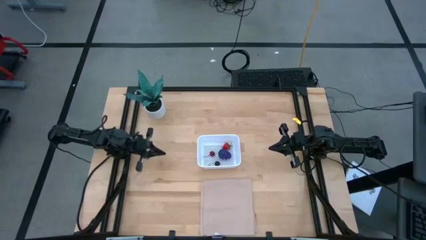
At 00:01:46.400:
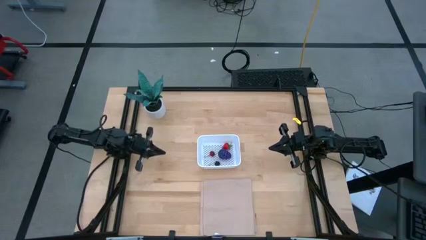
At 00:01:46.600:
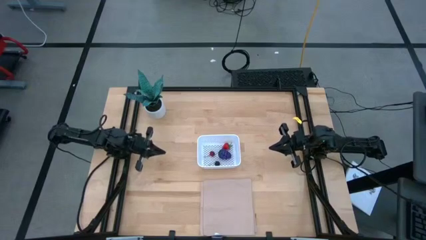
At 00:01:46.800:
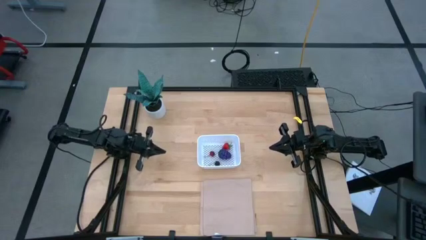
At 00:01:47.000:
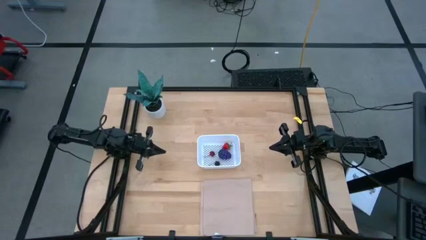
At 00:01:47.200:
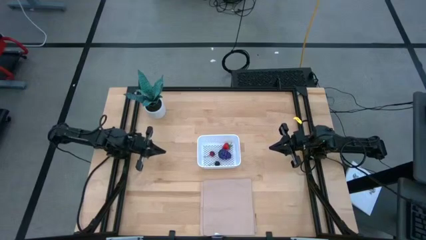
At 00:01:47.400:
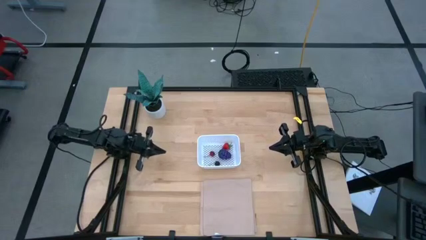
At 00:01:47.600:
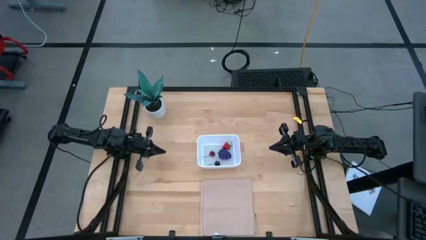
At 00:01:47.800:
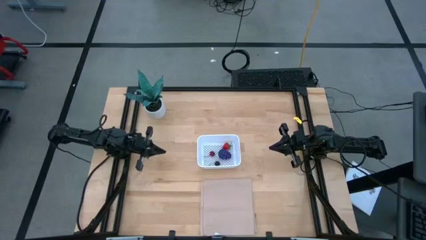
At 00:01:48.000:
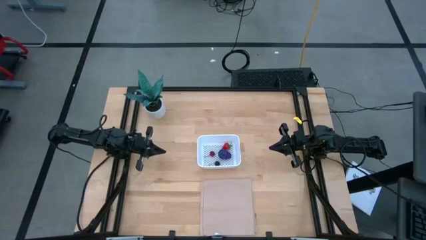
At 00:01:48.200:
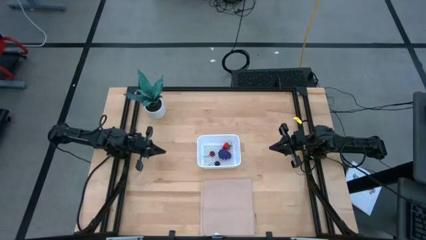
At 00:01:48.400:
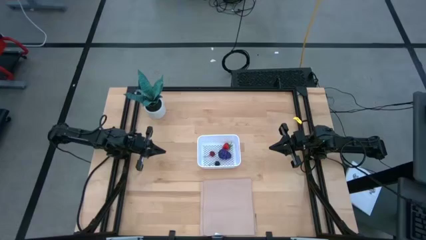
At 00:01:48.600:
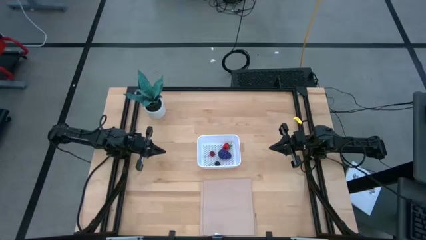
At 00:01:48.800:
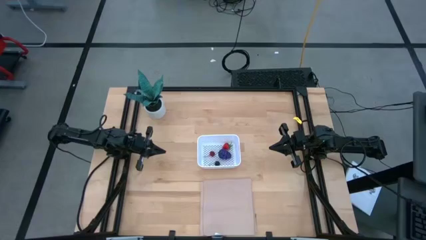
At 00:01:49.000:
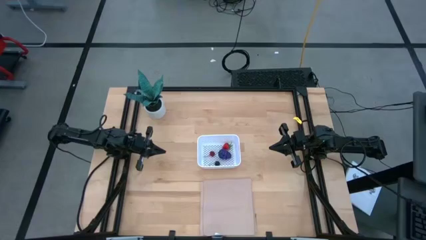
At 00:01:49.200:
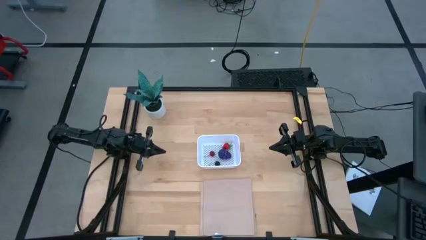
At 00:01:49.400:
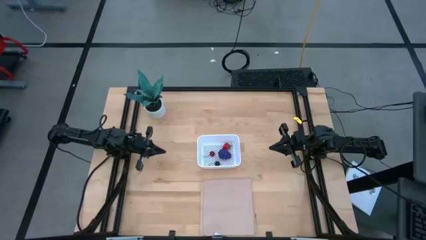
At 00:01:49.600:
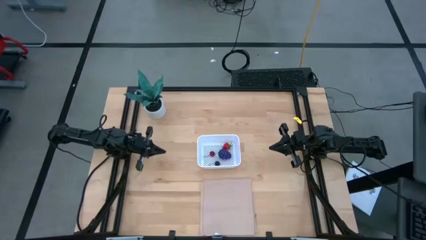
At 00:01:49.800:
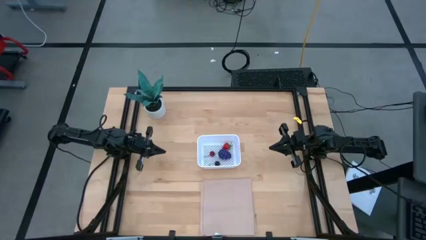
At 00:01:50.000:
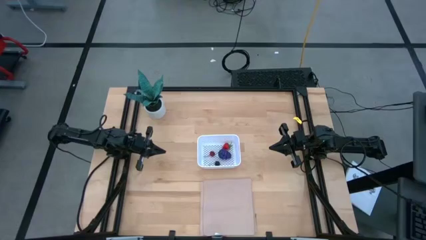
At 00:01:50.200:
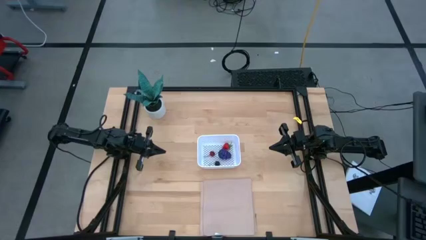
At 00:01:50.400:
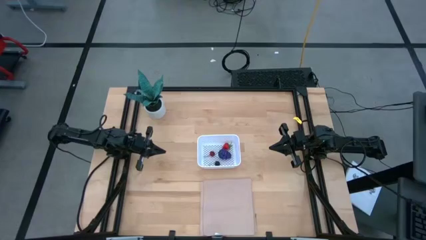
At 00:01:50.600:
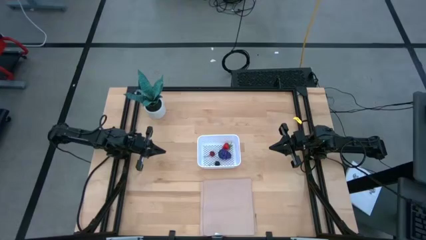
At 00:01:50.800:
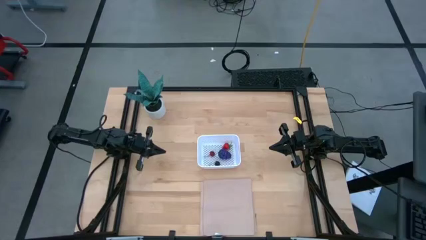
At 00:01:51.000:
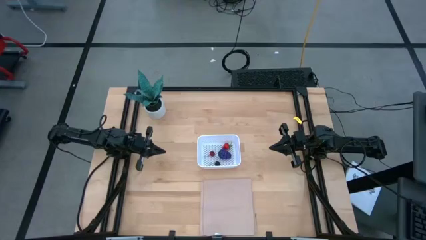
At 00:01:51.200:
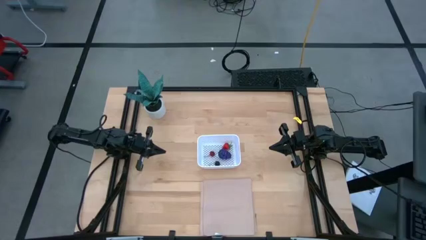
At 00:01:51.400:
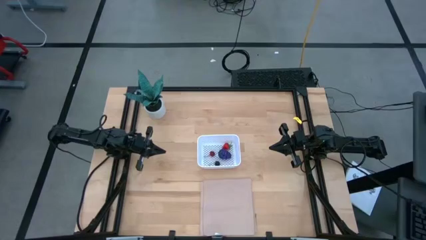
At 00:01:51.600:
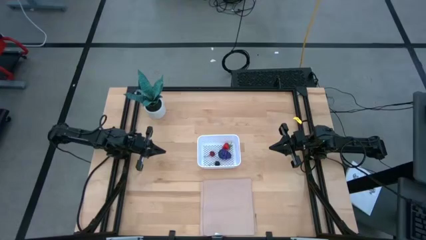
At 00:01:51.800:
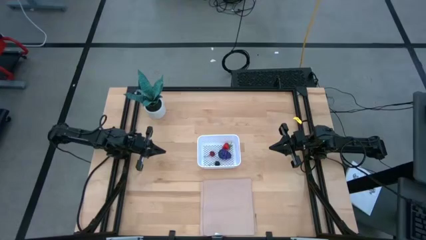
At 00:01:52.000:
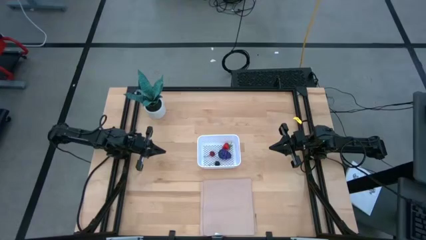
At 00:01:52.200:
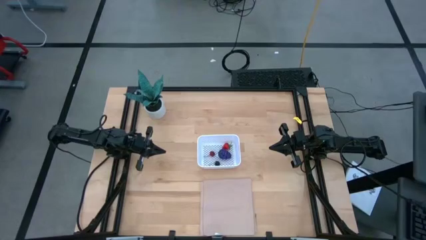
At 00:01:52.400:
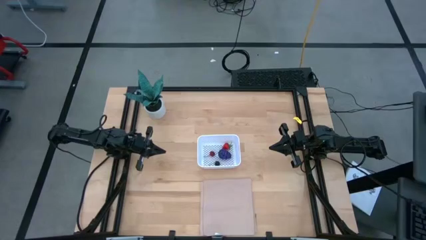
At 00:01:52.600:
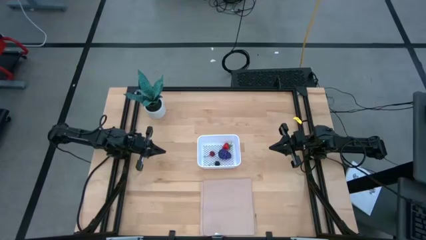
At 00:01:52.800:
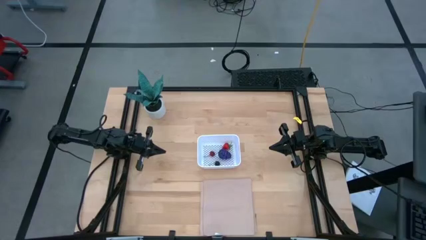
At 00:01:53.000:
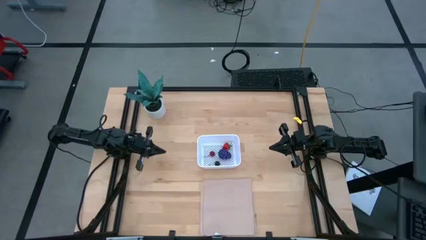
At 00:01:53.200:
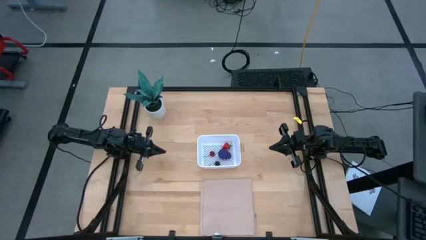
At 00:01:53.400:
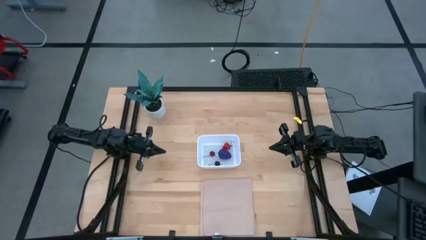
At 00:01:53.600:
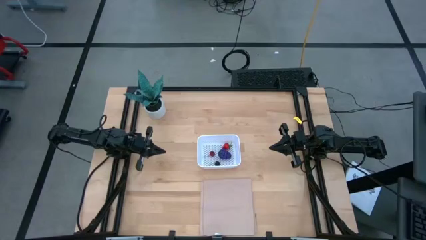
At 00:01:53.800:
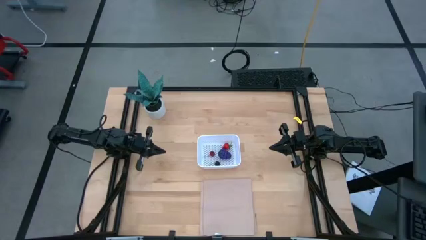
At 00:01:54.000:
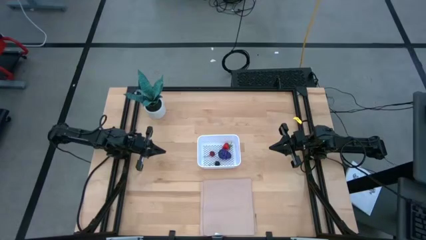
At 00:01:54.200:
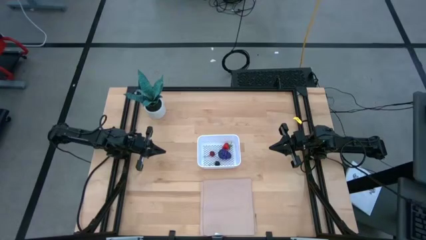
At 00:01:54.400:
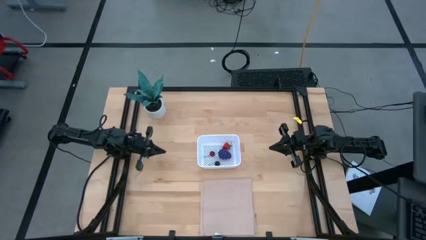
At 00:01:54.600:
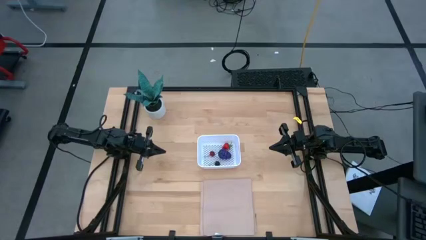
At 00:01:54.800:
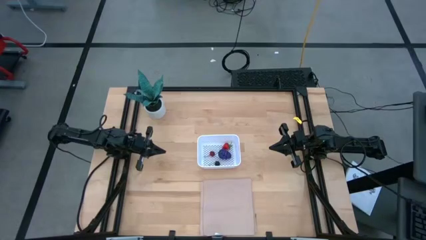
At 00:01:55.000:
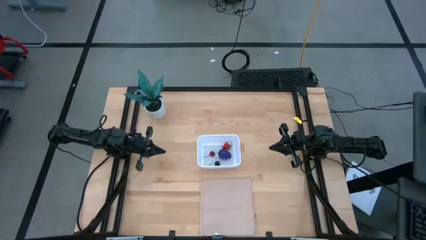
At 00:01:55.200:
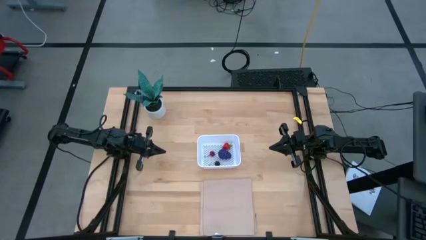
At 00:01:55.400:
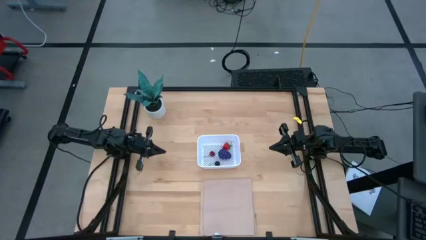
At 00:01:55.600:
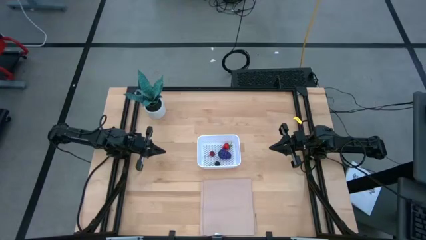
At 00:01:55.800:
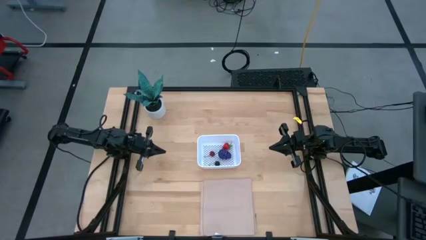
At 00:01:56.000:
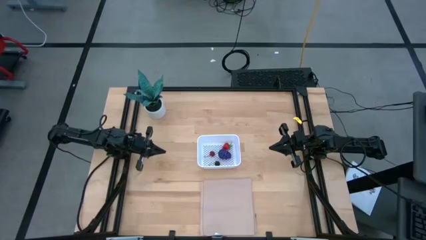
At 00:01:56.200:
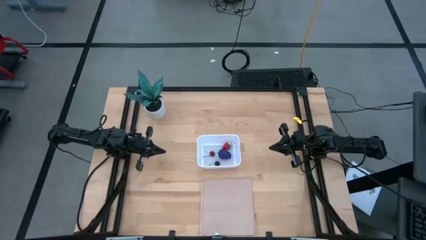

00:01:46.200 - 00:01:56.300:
Task: Pick and placing Produce into tupperware
Return to home position

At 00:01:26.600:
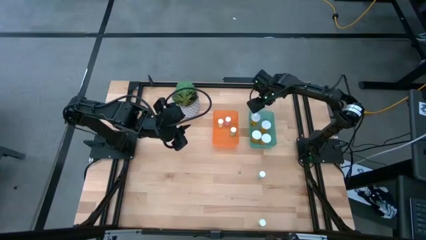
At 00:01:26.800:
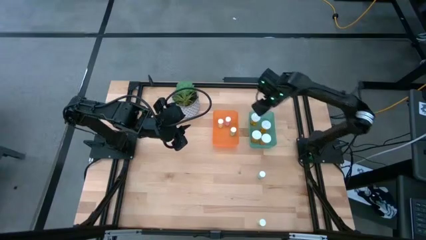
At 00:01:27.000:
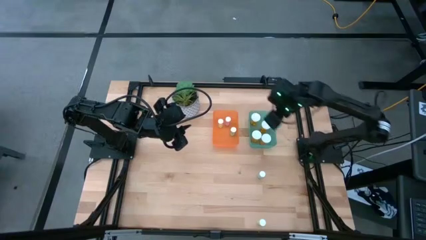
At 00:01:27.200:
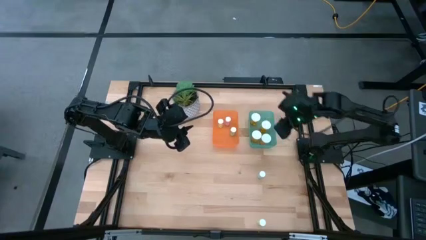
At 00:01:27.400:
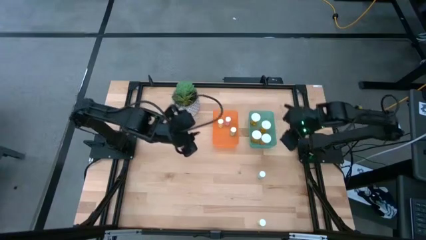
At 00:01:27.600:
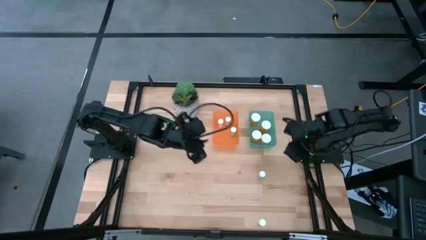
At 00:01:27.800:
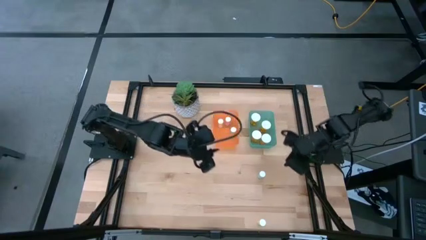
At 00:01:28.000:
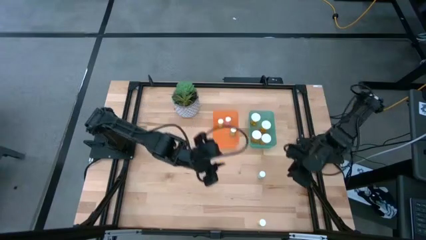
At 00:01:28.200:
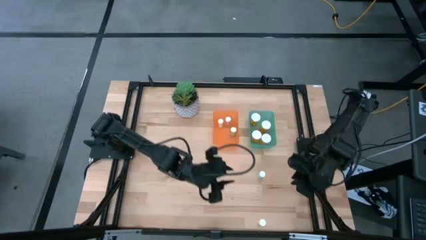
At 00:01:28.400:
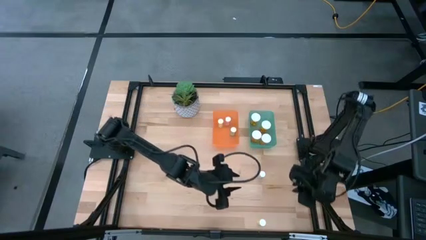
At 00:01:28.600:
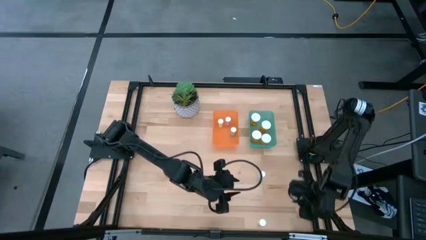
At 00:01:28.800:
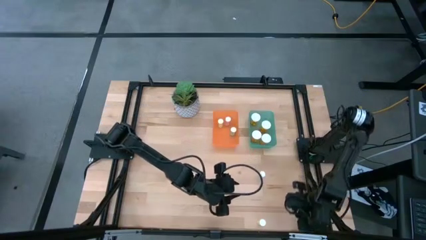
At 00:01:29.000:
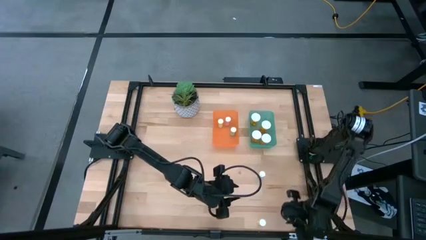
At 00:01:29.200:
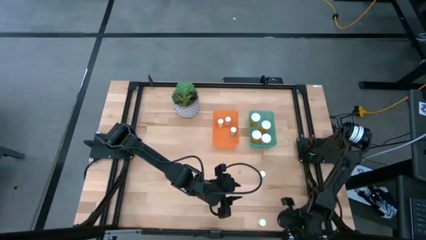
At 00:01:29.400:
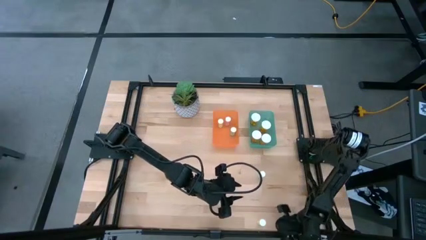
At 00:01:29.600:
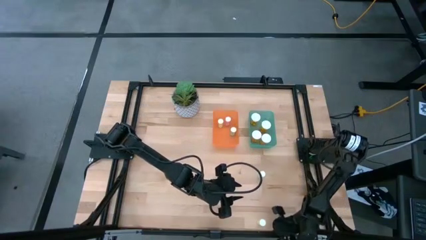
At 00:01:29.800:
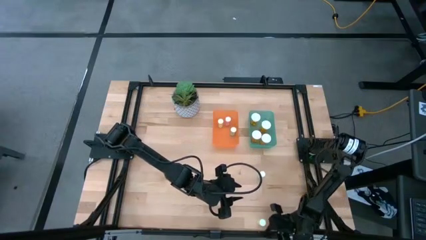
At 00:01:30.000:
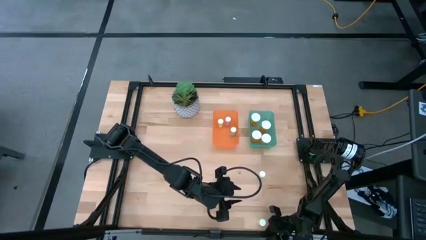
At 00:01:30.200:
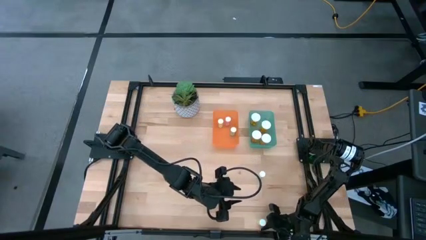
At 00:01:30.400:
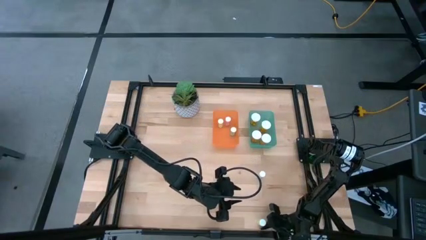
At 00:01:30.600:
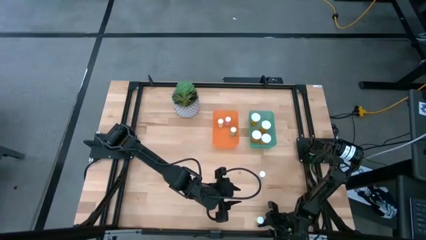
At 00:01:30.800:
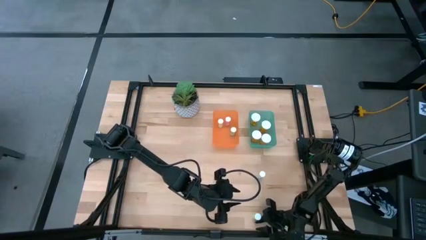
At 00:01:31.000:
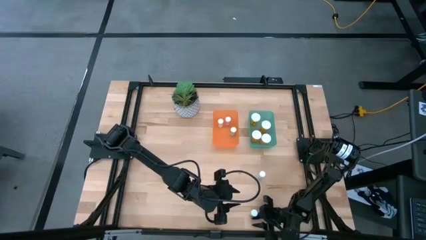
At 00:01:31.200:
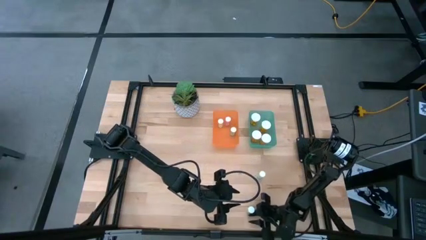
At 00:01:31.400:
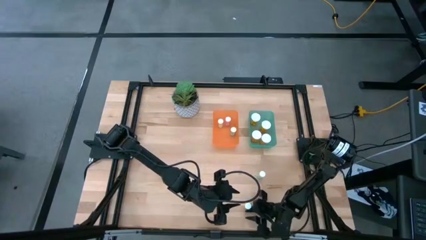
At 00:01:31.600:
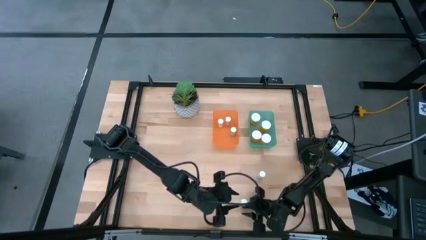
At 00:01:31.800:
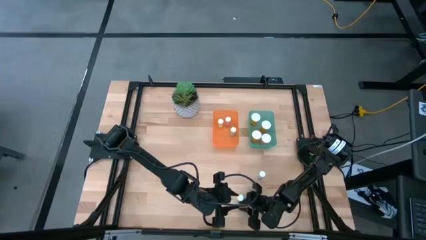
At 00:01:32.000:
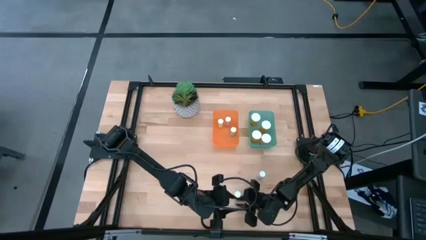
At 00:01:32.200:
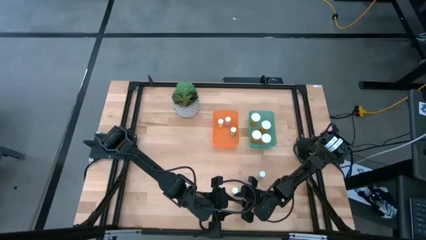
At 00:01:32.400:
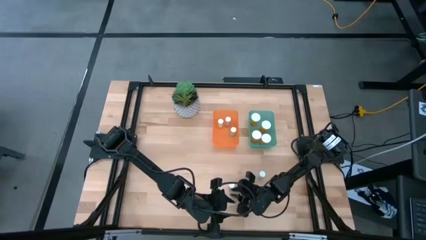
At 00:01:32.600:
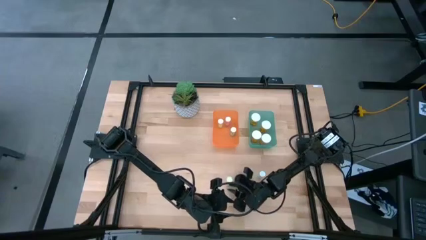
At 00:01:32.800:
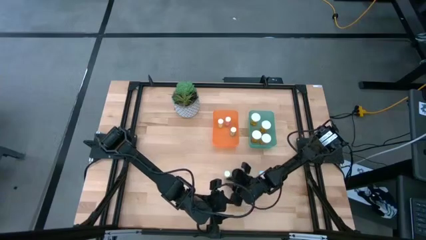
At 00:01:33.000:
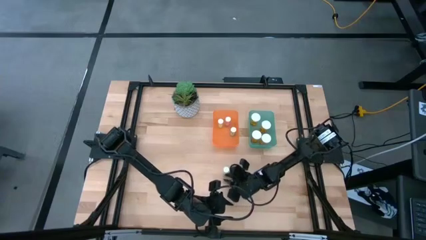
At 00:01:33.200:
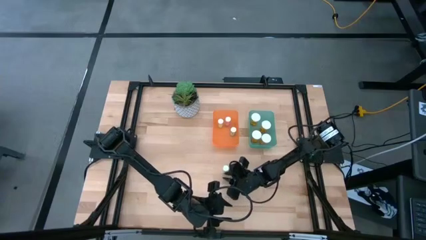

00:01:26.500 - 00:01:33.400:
Task: Pick and place medicine bottles into bin by pill shape (circle, oval)
Move the small yellow bottle to the center of the table
